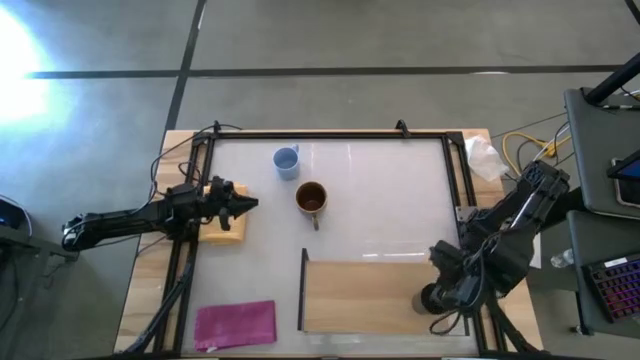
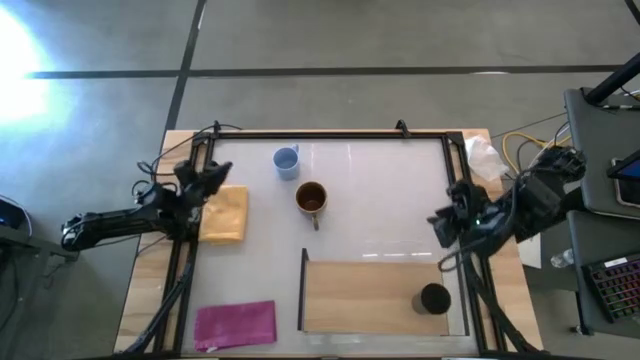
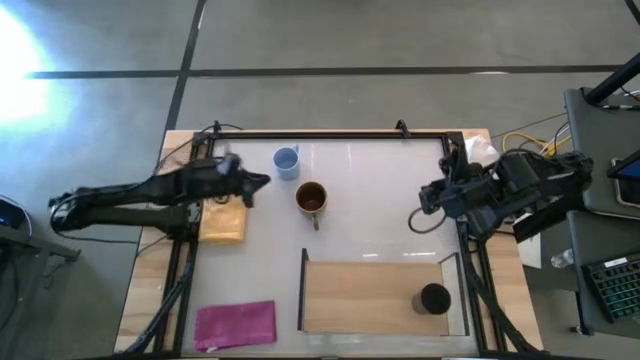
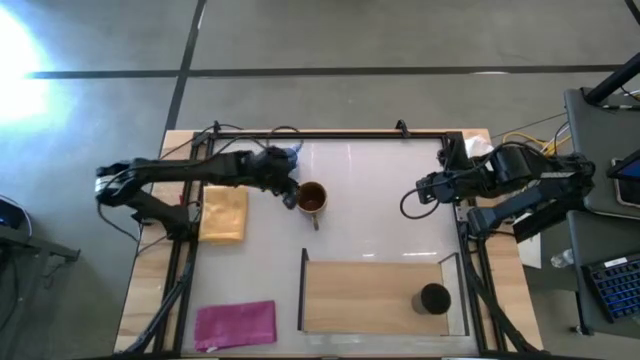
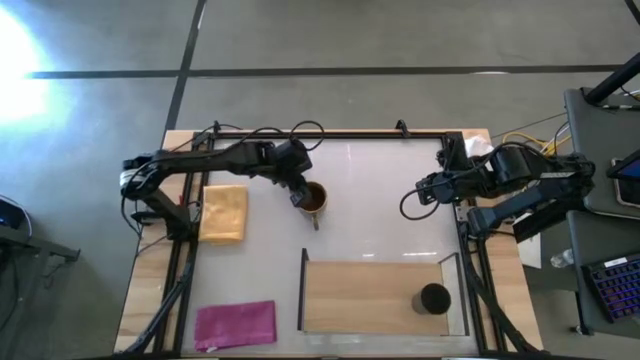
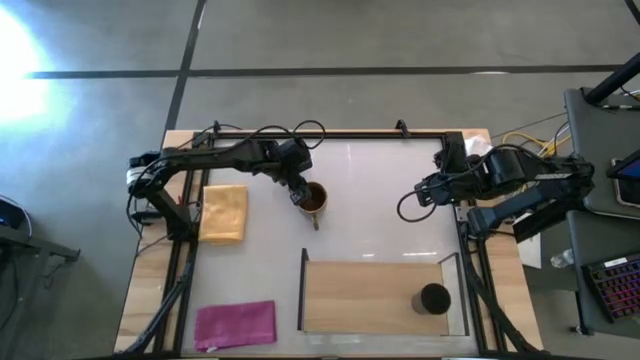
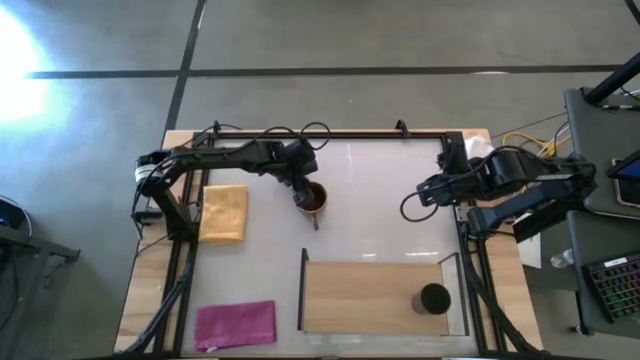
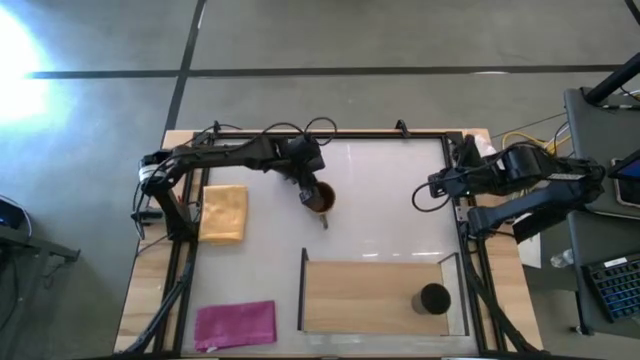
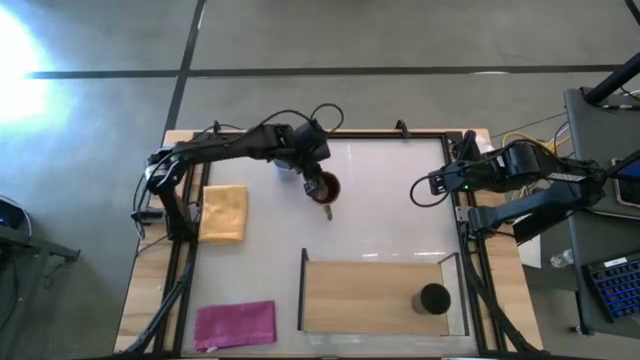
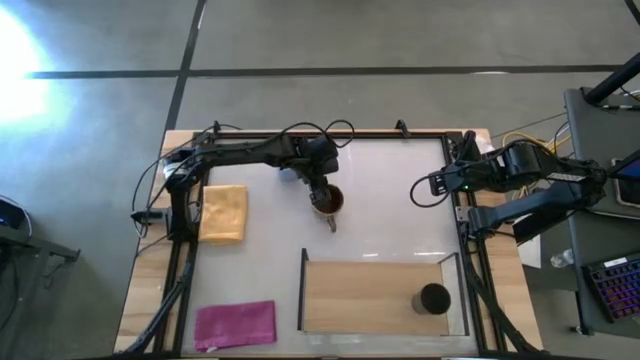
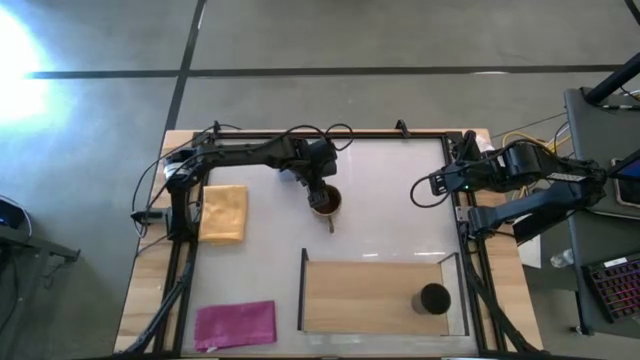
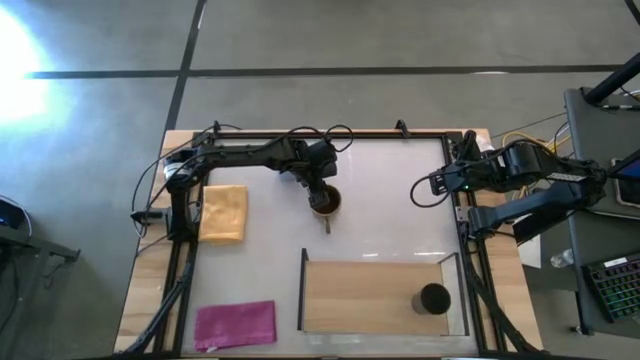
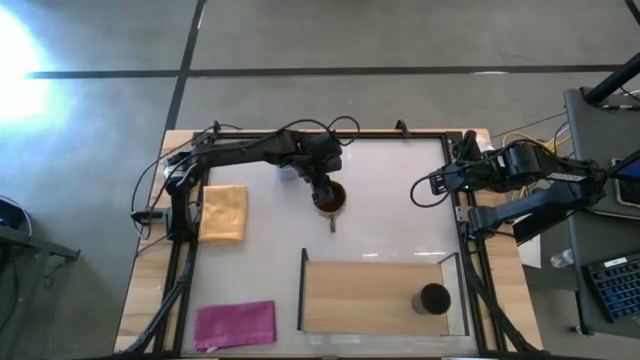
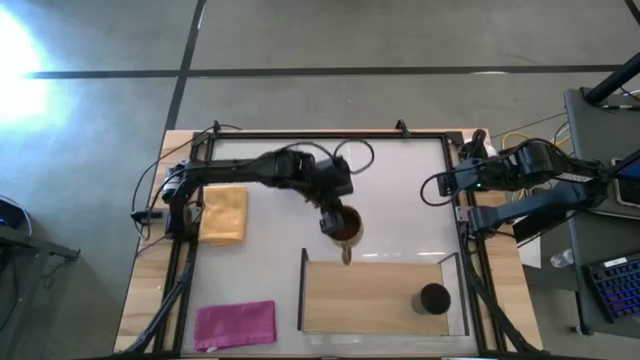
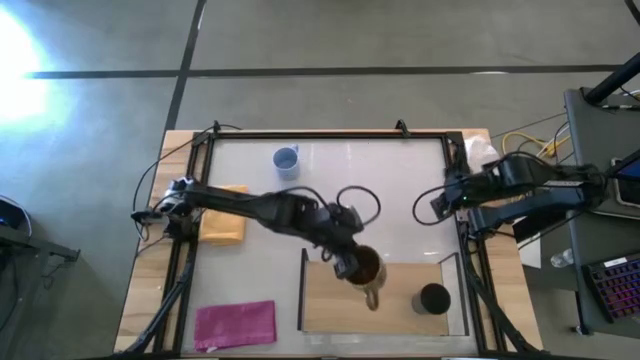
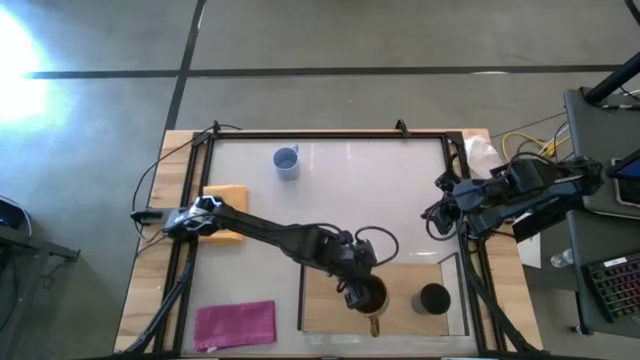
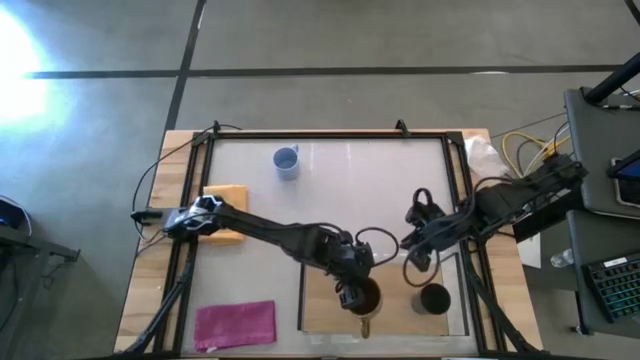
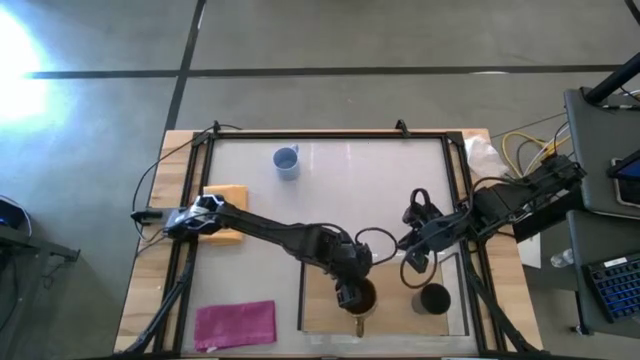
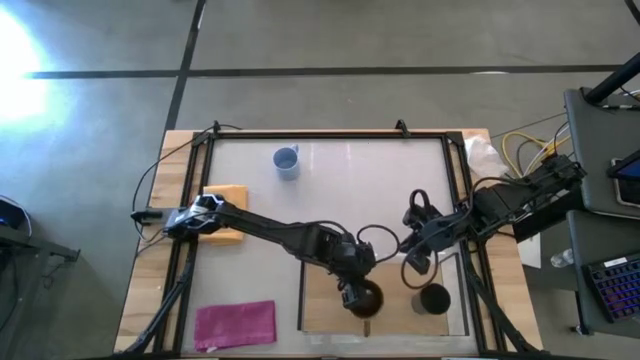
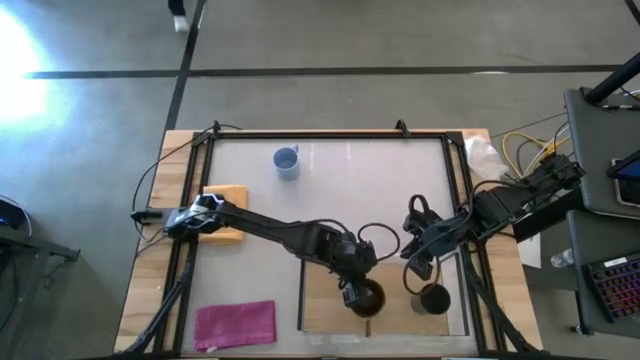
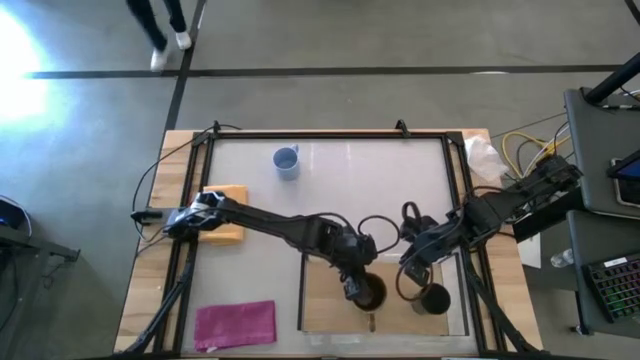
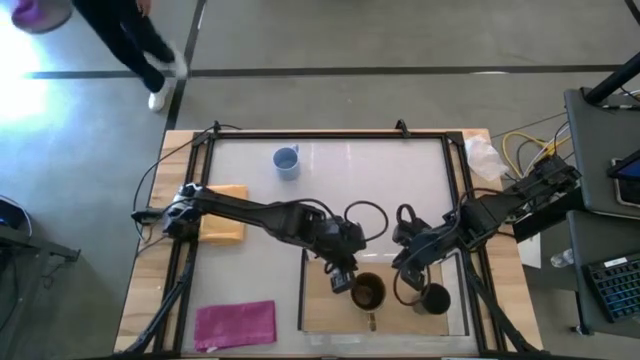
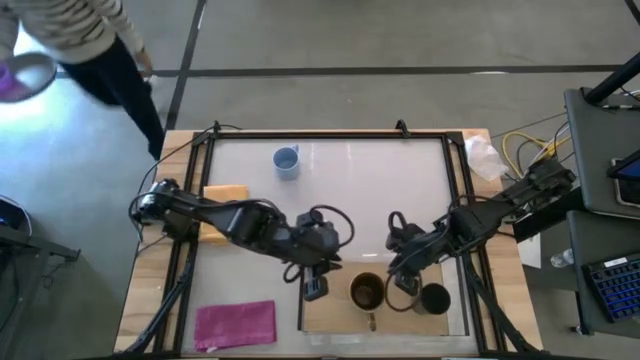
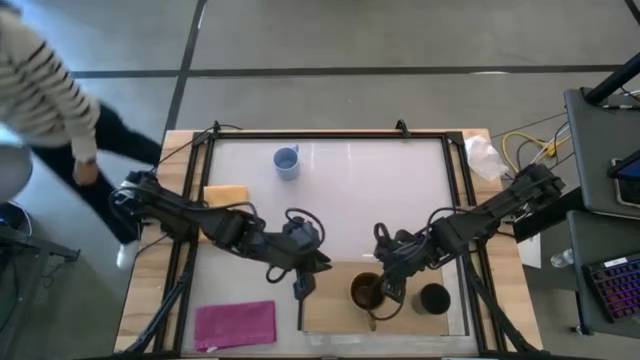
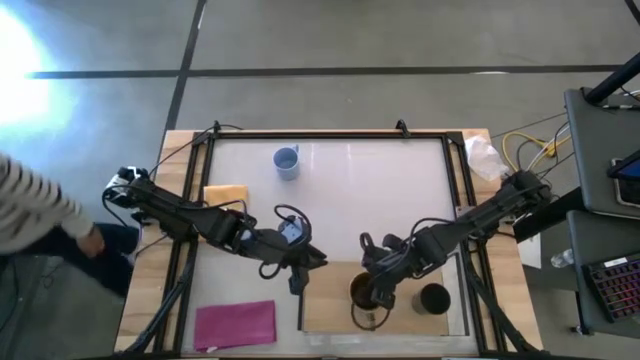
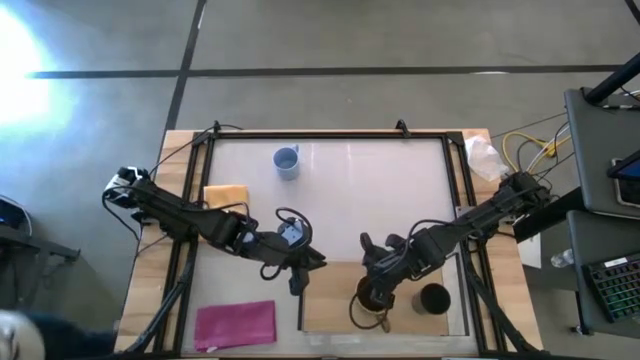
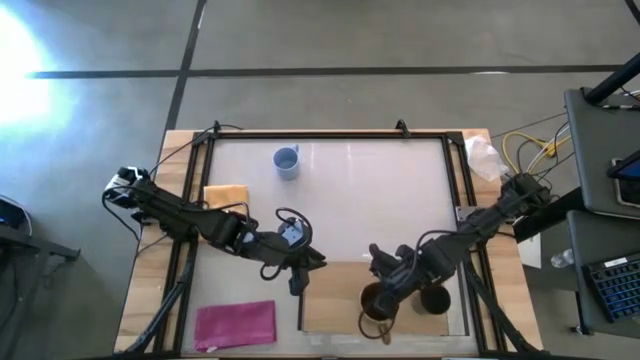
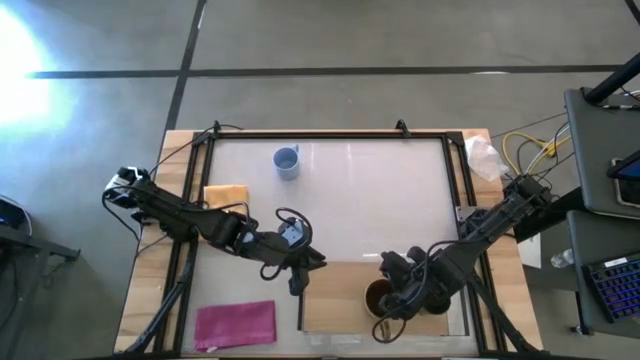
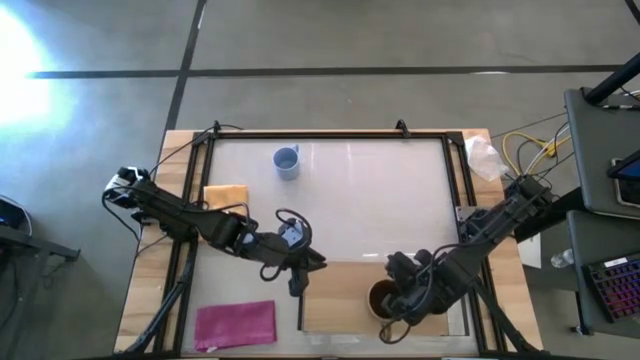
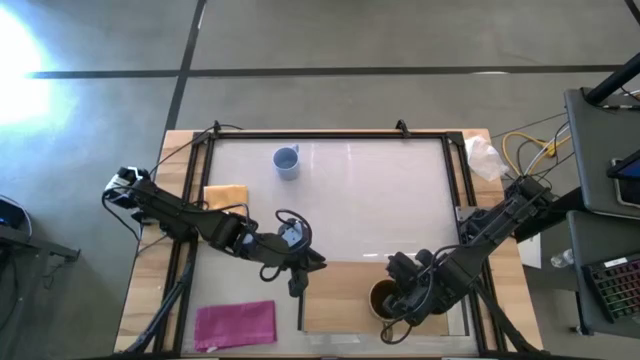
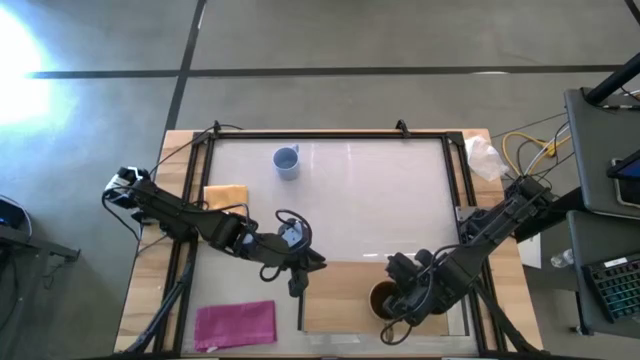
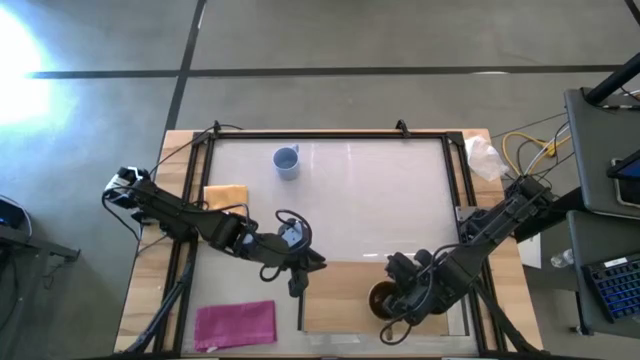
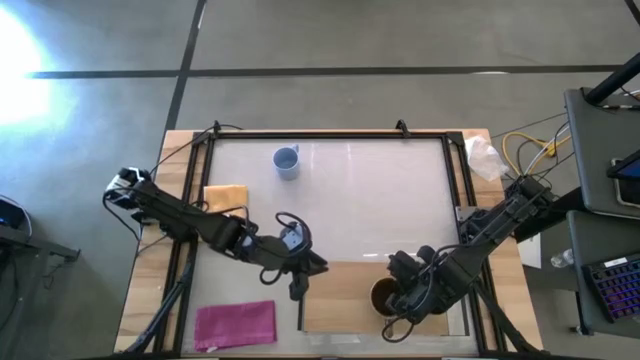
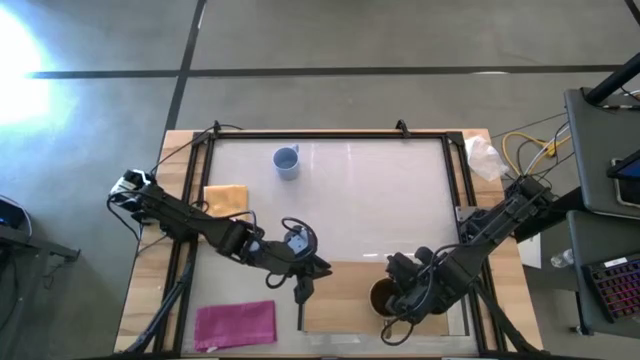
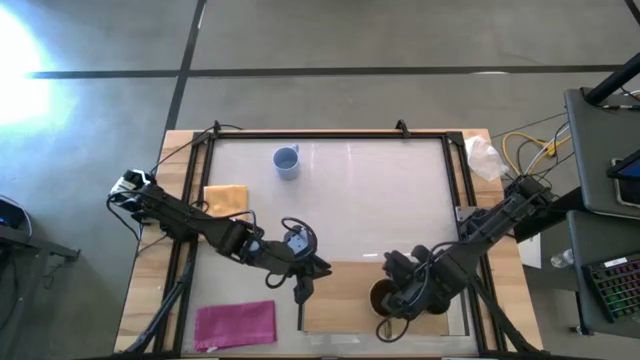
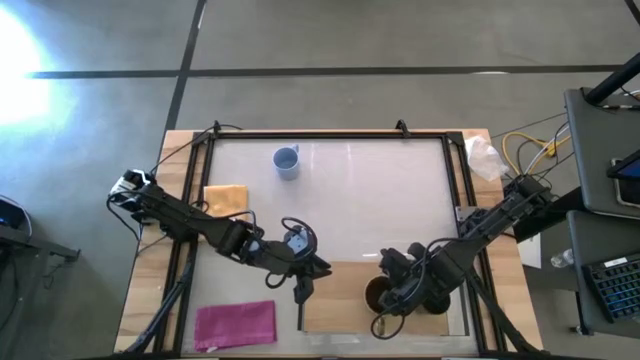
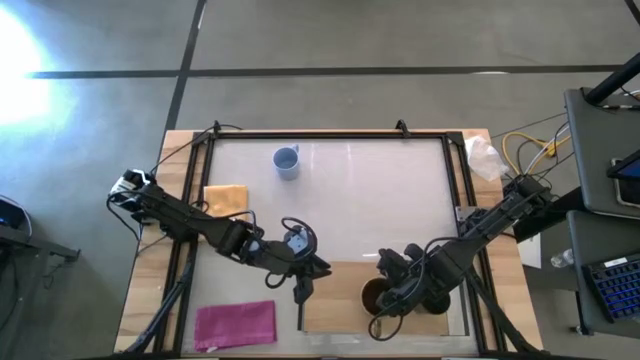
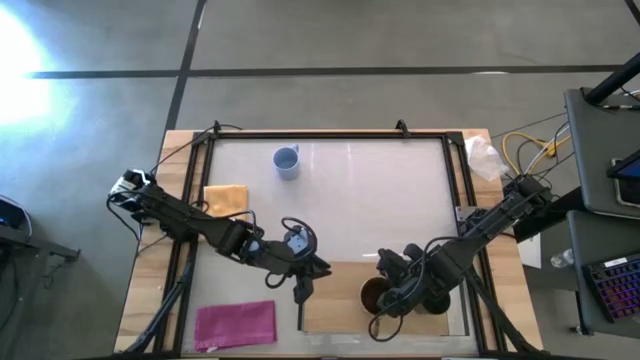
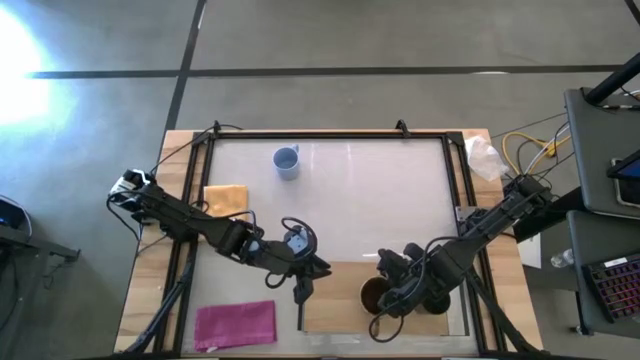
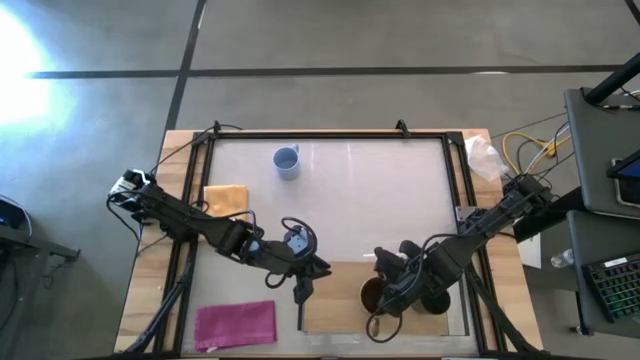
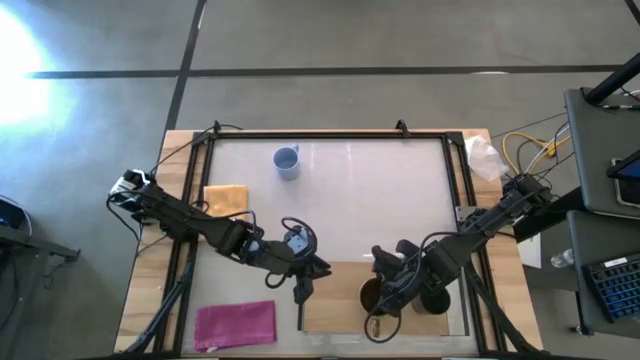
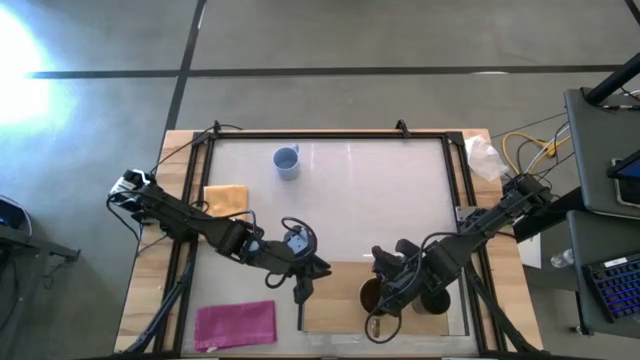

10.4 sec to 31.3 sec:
Task: Stack small to large cups/mugs on shelf
Put the green and brown patterned mug on the shelf
